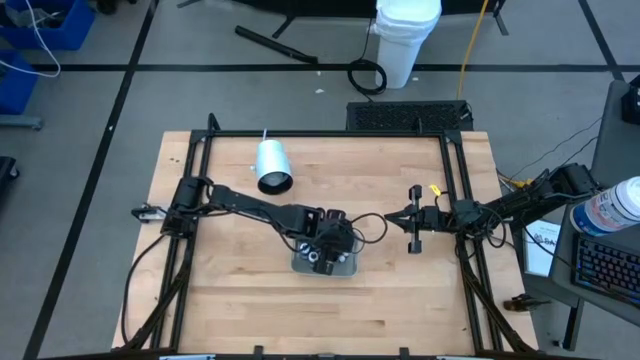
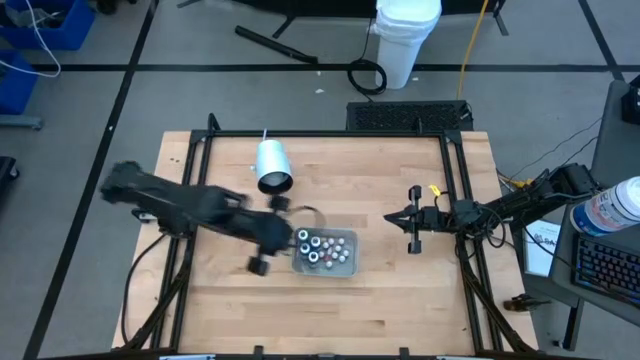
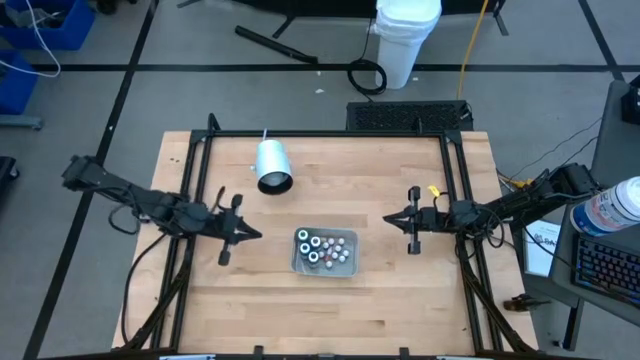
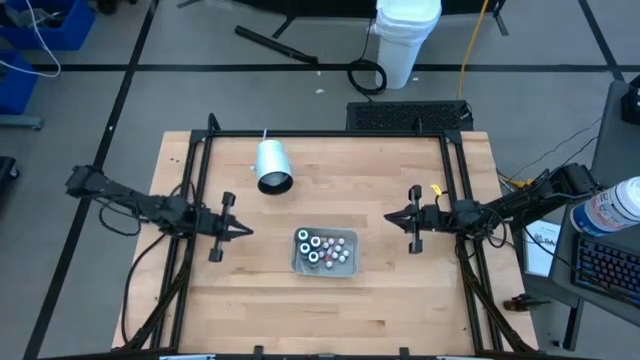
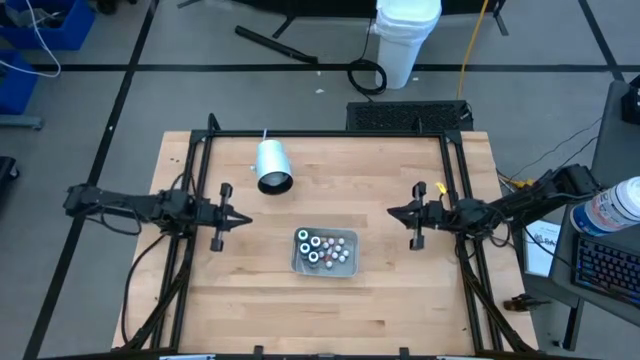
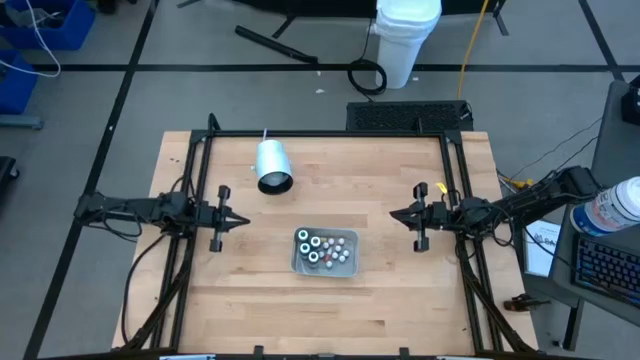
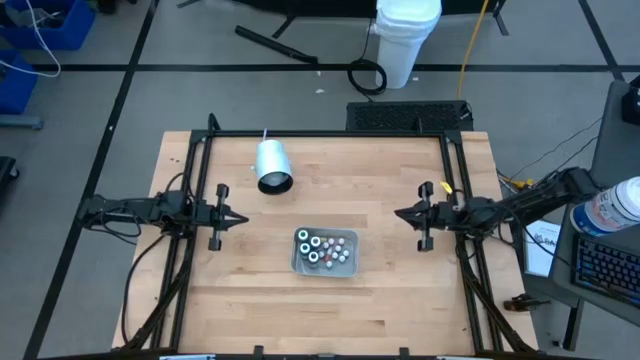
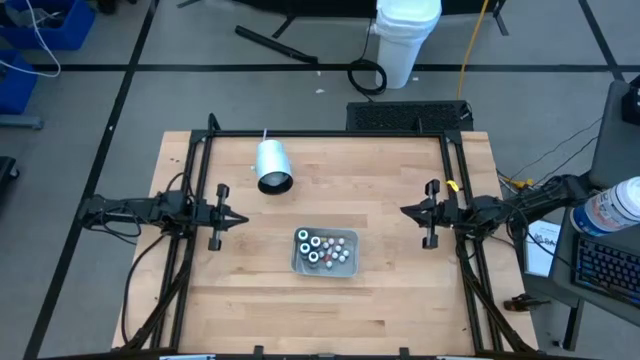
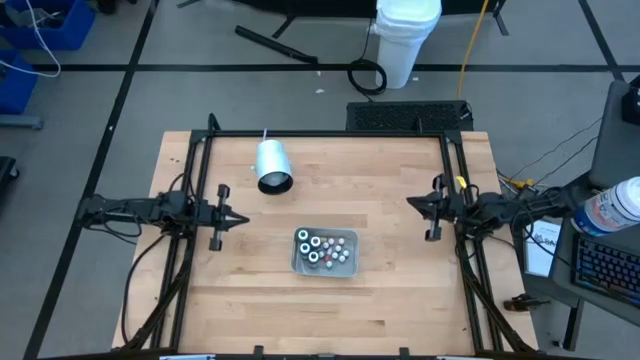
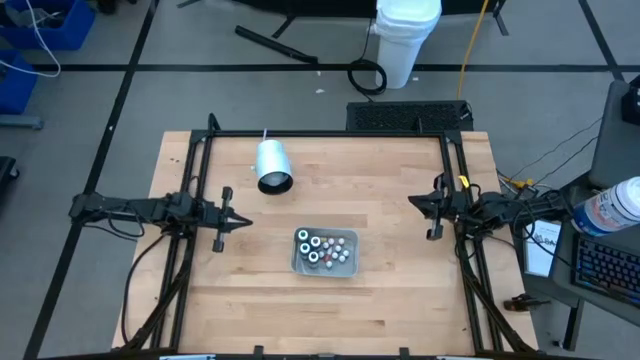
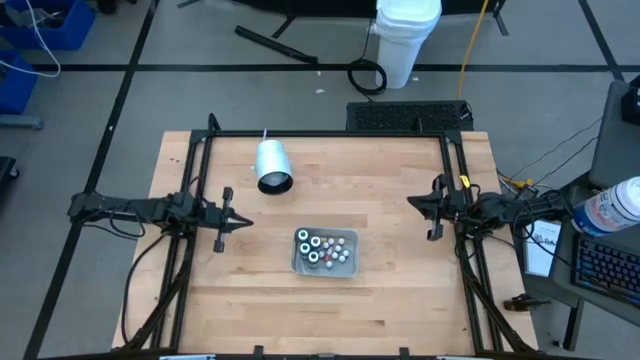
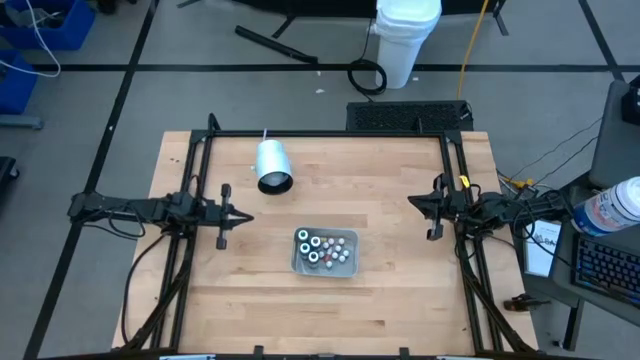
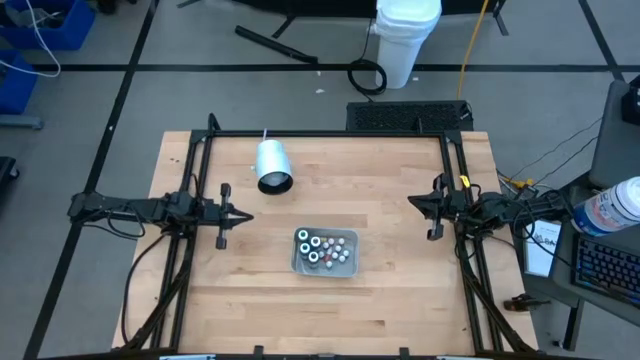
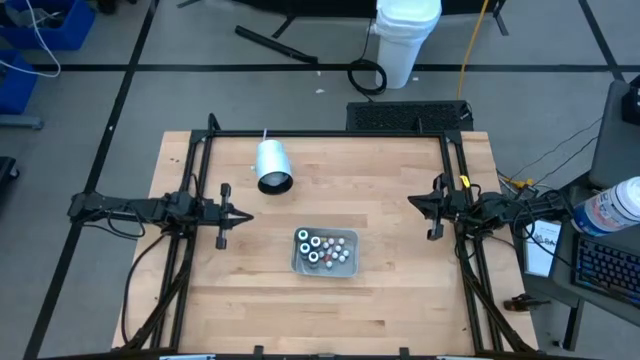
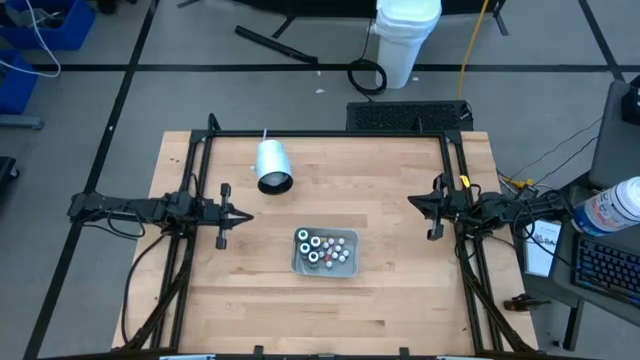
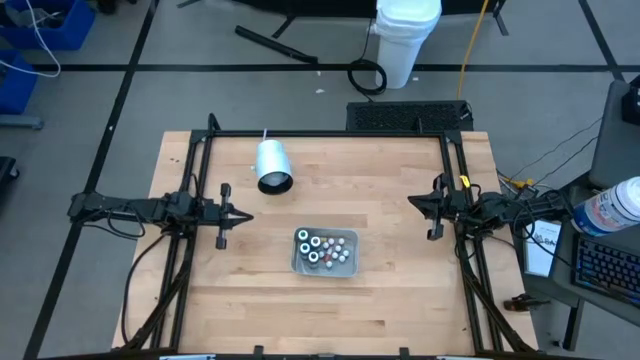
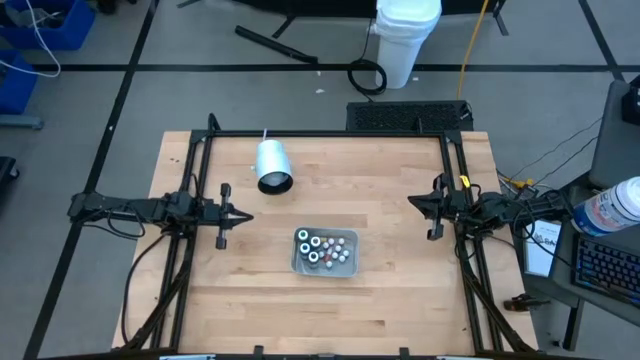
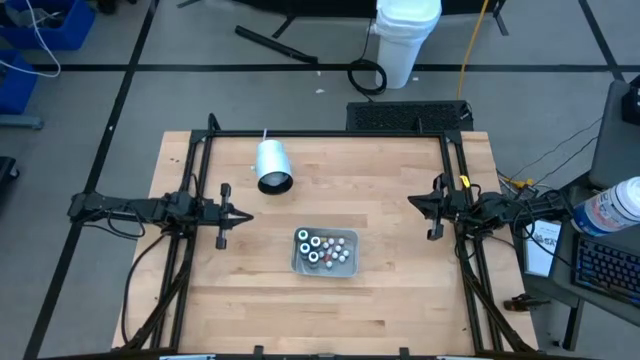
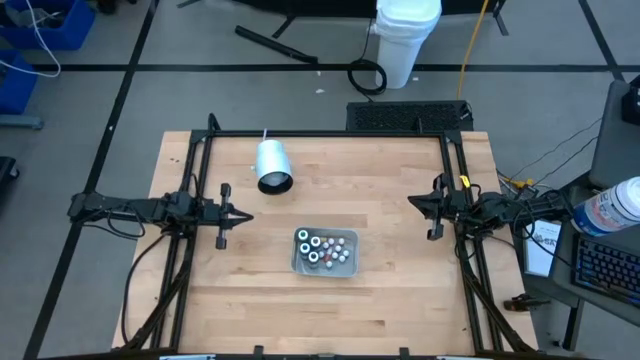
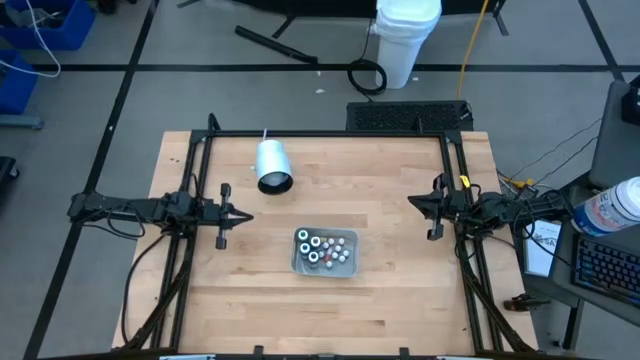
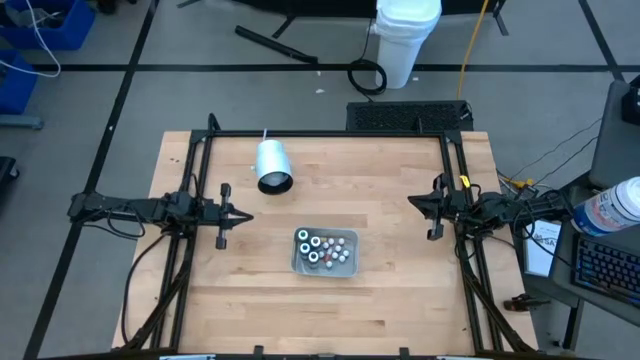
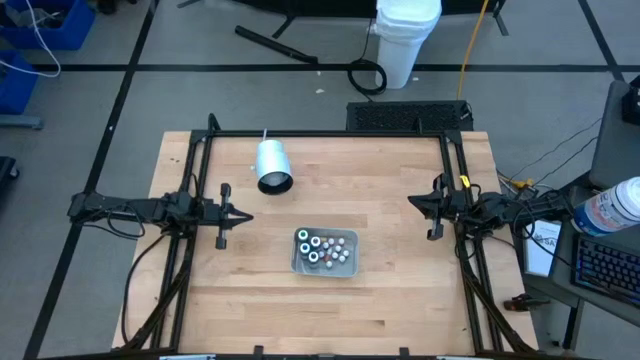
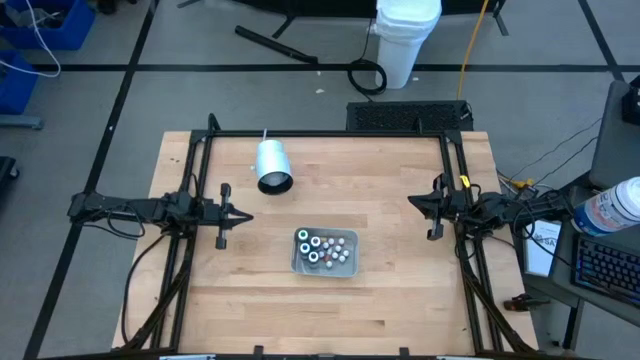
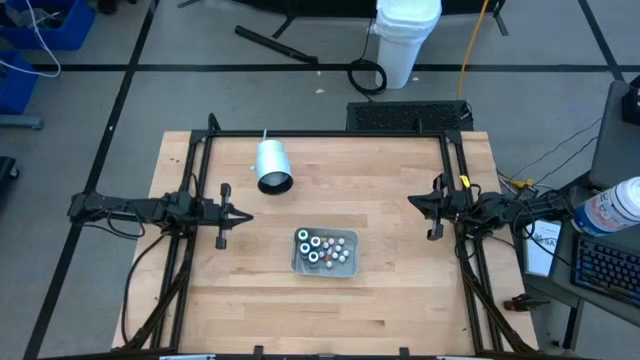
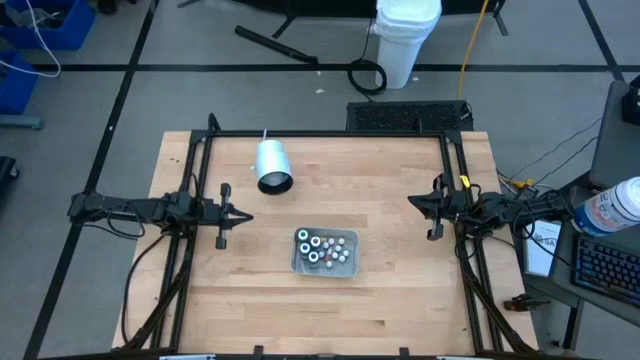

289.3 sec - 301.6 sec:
Task: Pick & Place food coloring
Return to Home Position
